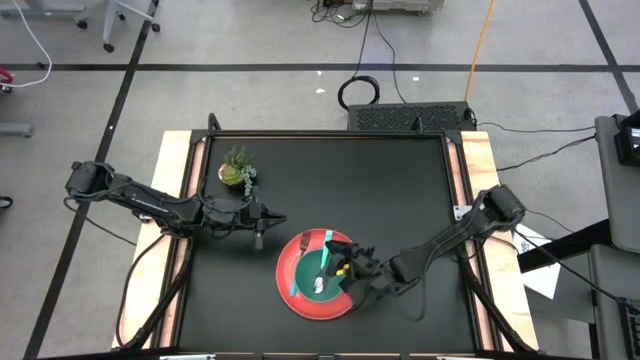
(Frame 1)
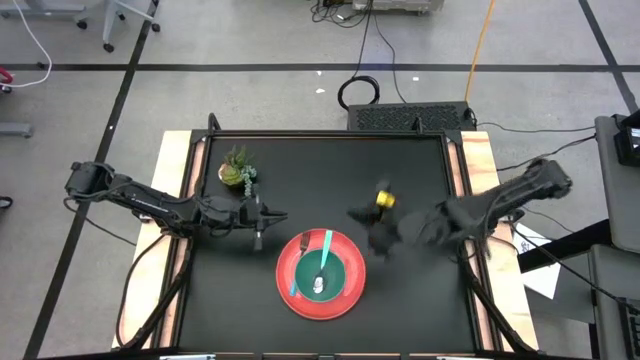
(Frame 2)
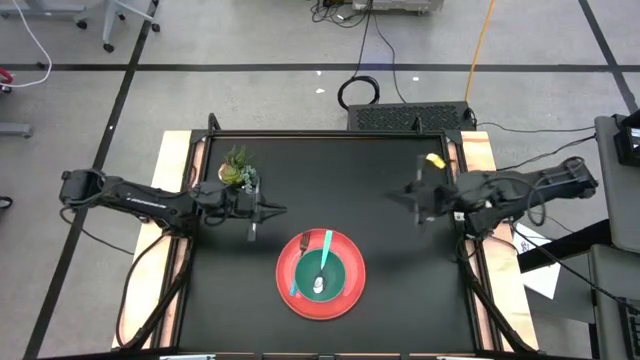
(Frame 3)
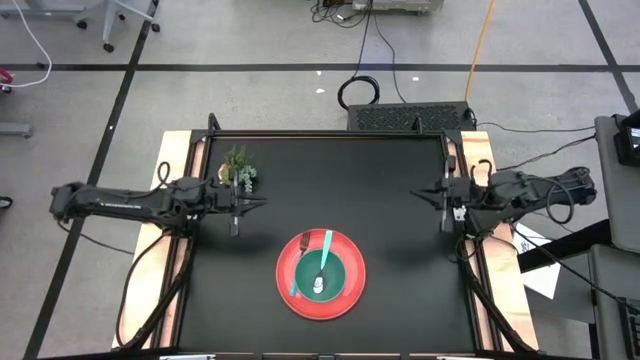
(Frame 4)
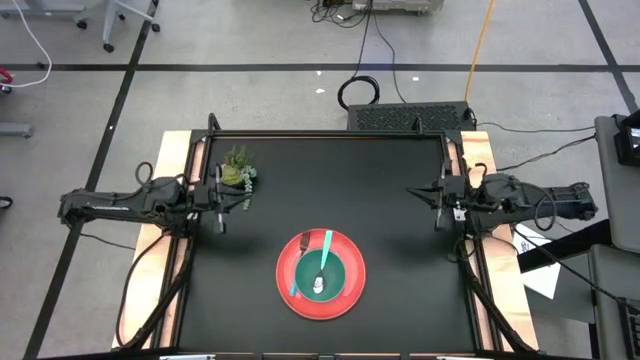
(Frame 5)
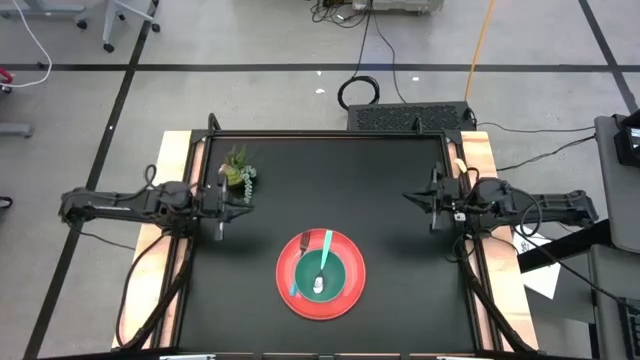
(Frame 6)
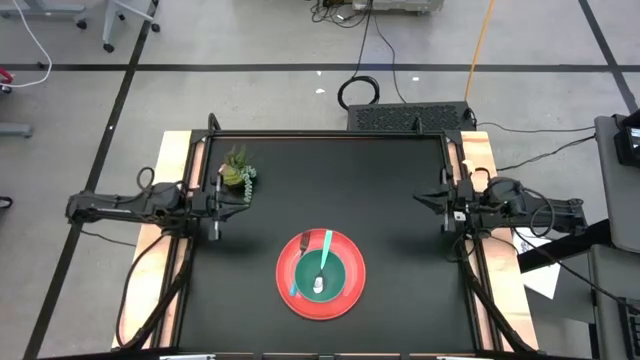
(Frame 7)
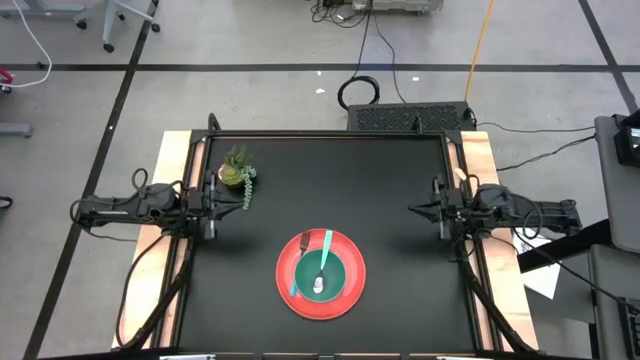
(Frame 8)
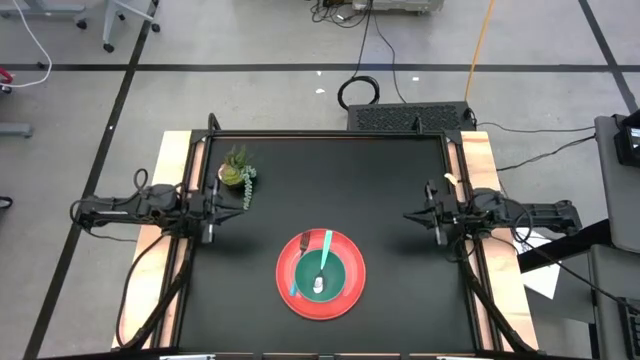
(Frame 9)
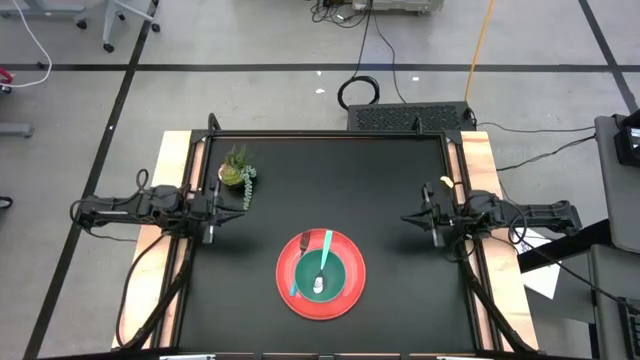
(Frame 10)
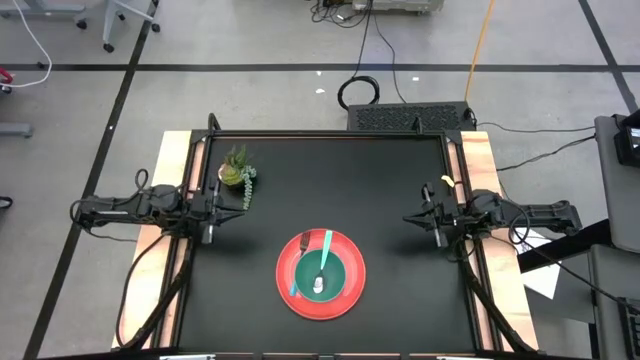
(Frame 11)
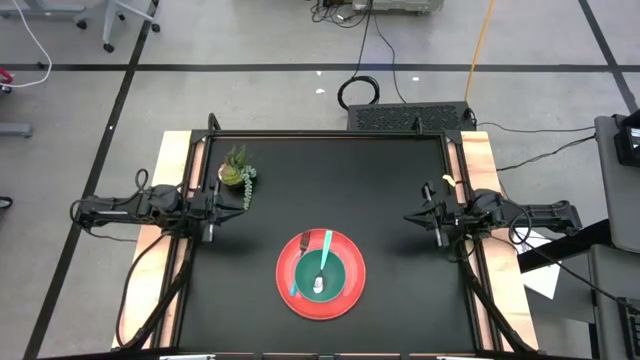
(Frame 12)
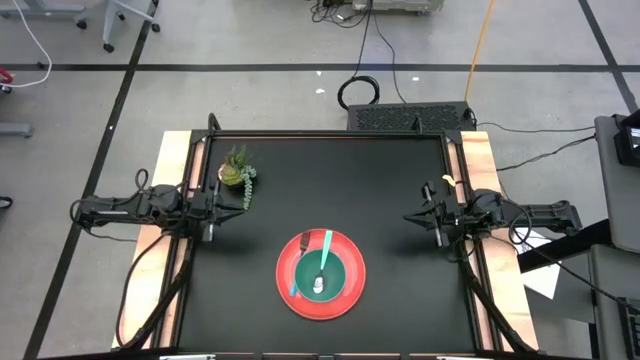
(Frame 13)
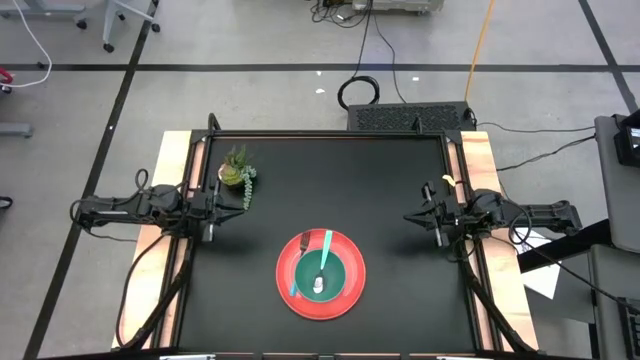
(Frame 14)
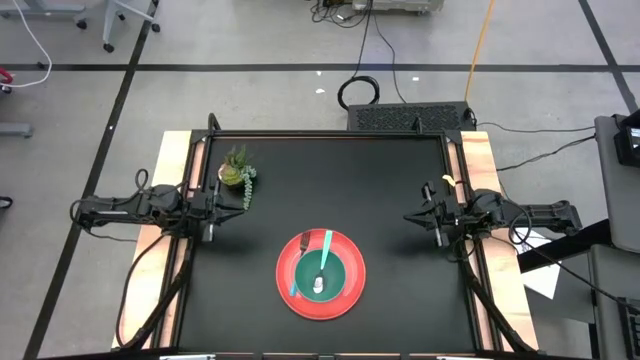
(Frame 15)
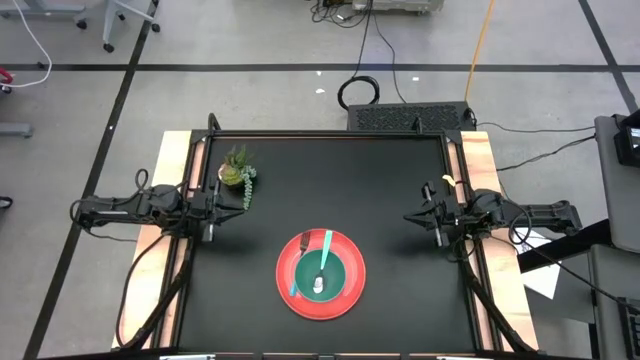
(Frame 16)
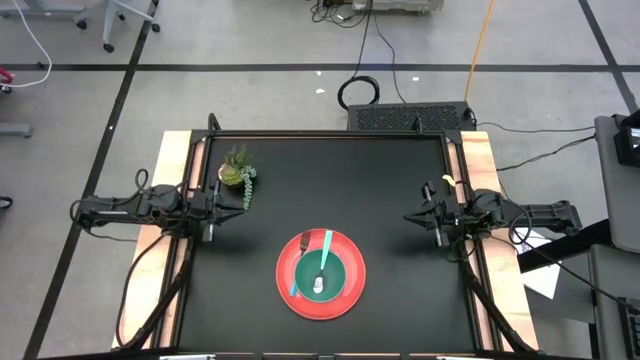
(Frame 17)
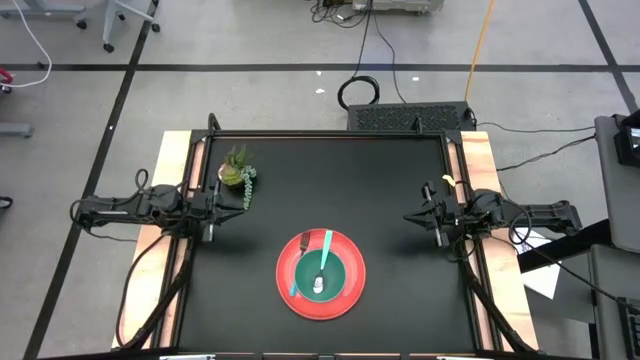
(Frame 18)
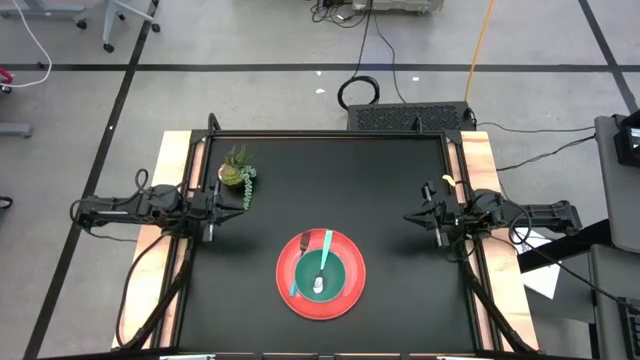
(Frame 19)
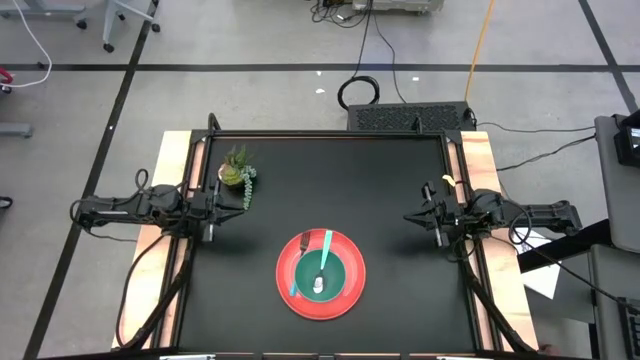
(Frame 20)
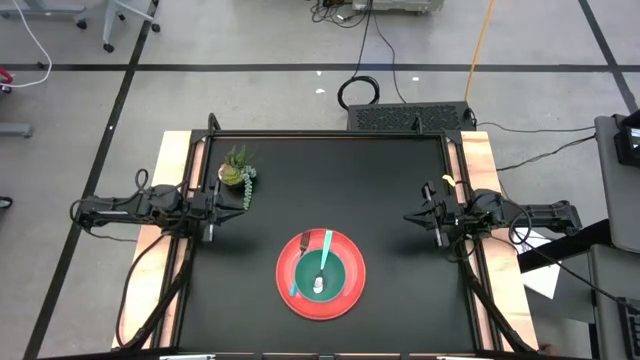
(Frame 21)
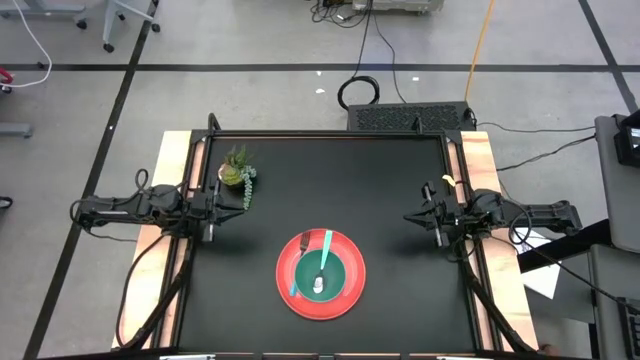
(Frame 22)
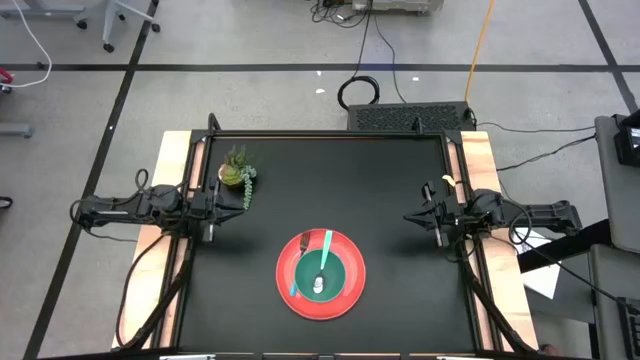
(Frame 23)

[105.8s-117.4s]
Task: Set table place
Return to Home Position

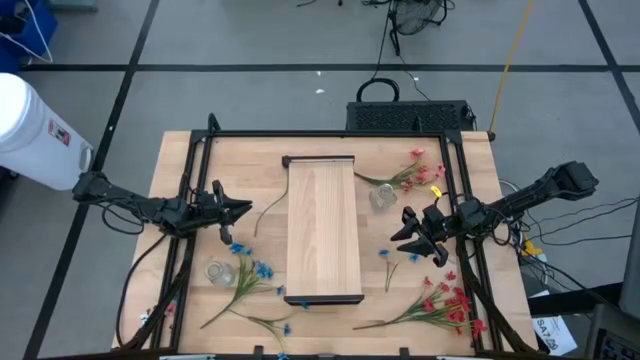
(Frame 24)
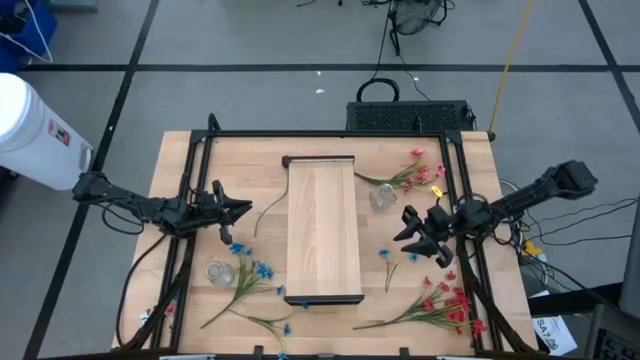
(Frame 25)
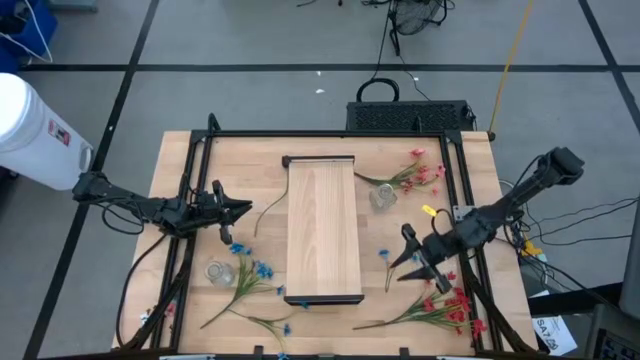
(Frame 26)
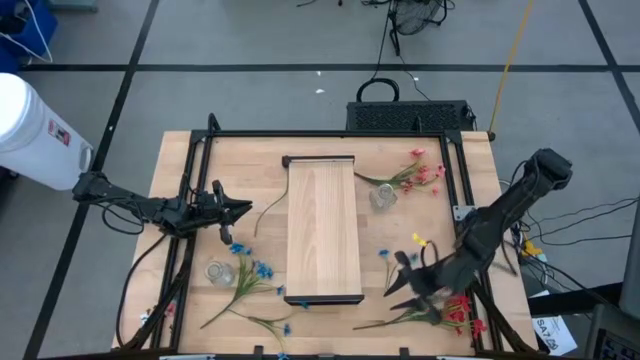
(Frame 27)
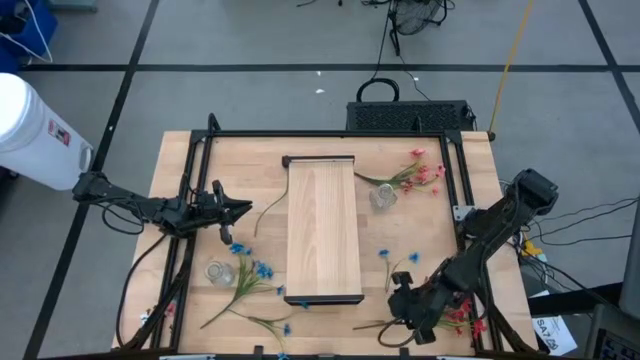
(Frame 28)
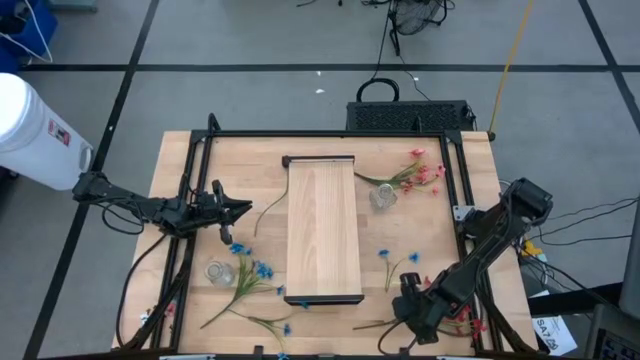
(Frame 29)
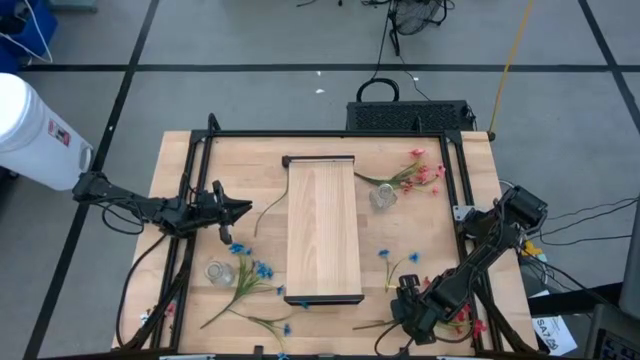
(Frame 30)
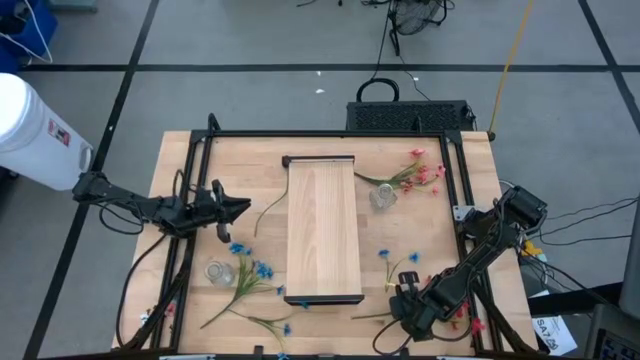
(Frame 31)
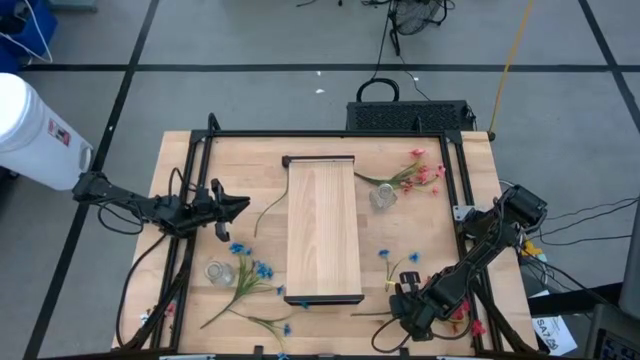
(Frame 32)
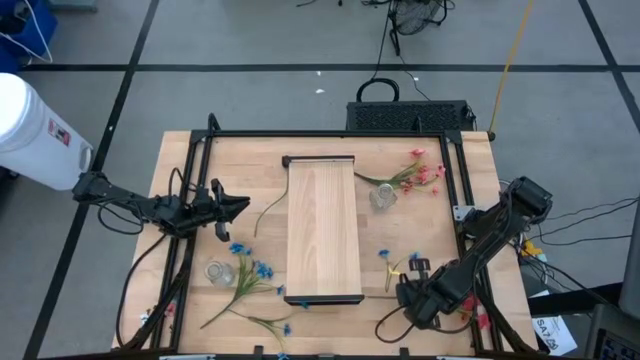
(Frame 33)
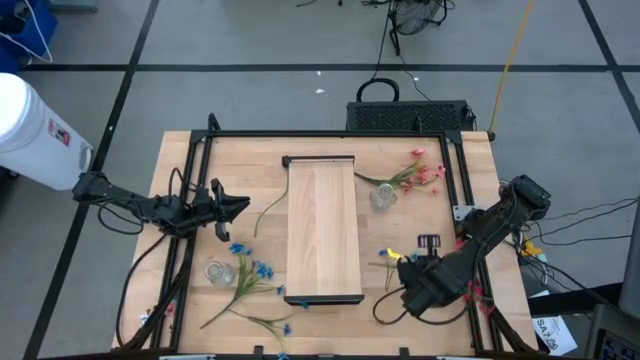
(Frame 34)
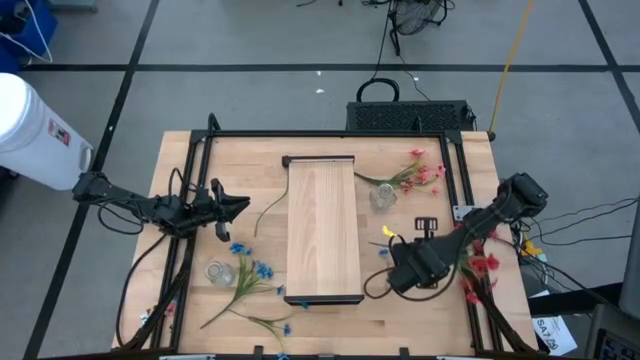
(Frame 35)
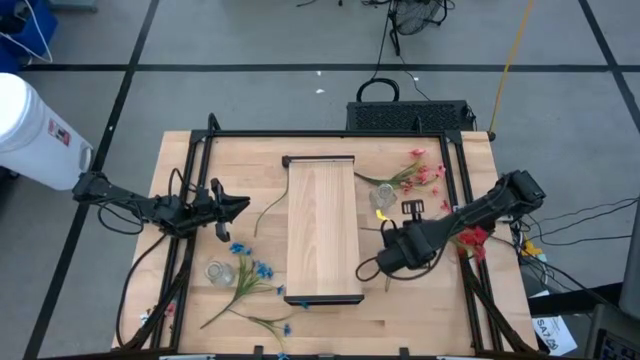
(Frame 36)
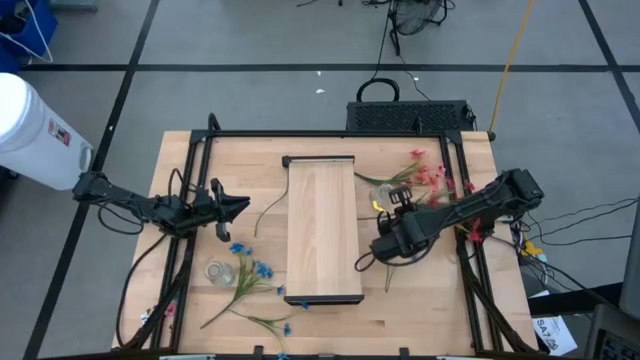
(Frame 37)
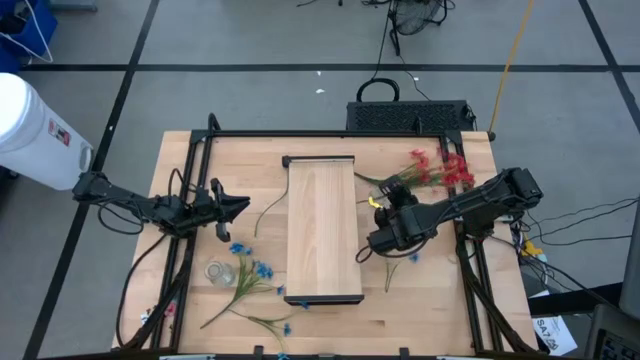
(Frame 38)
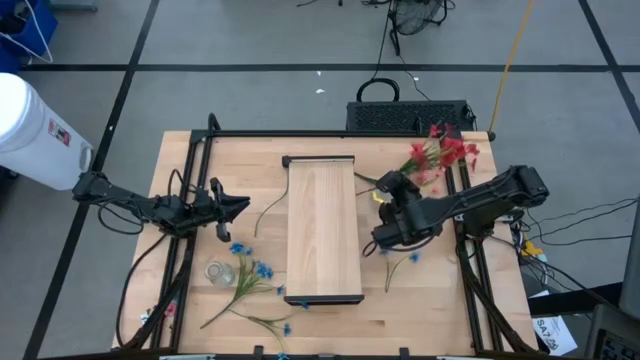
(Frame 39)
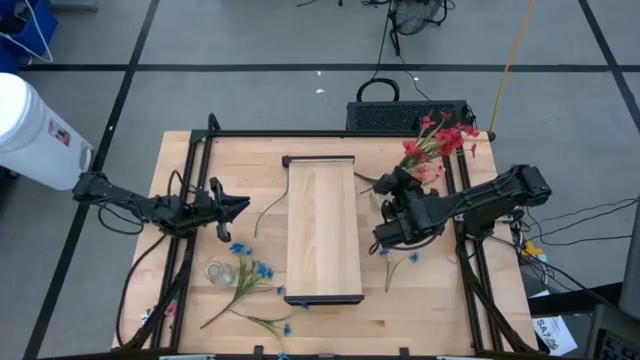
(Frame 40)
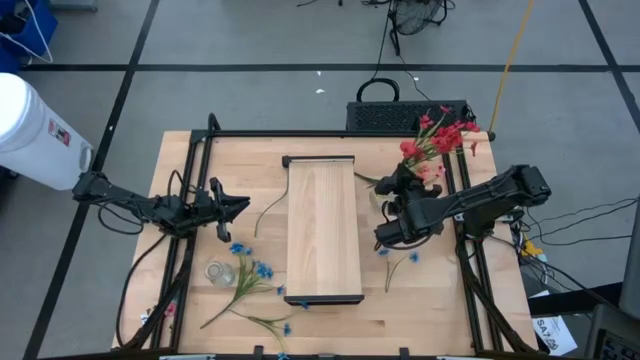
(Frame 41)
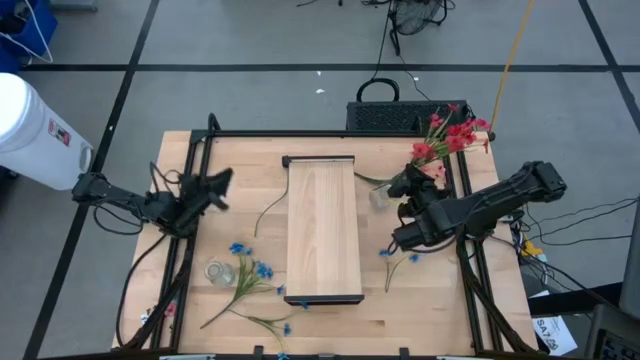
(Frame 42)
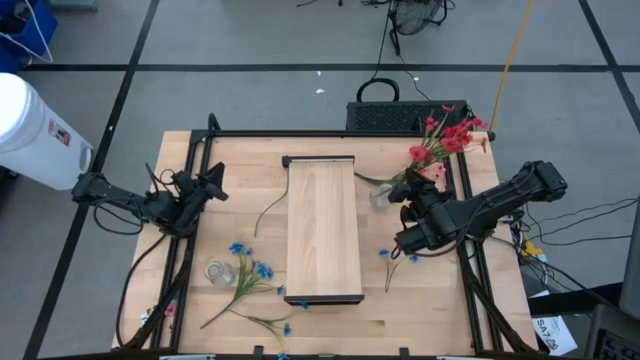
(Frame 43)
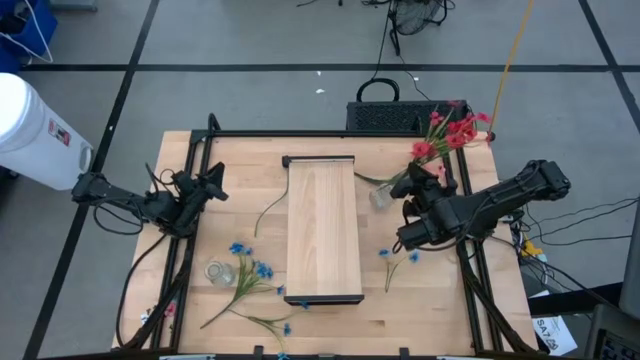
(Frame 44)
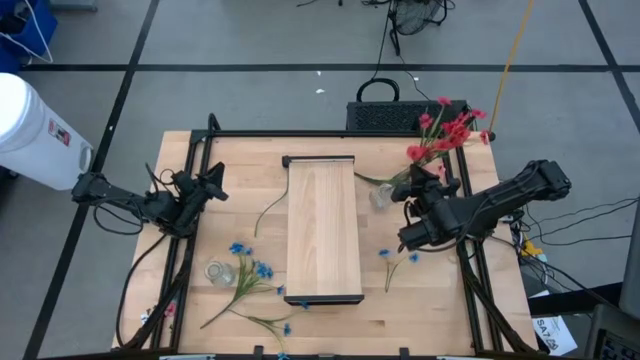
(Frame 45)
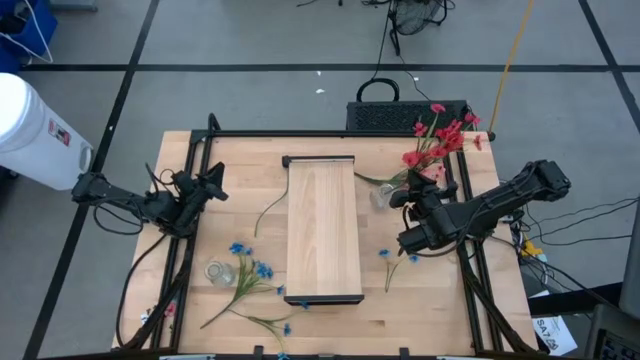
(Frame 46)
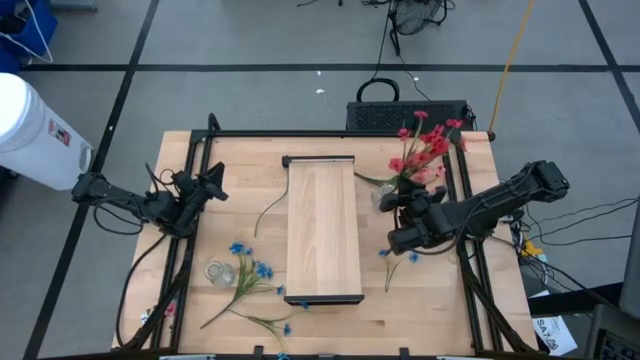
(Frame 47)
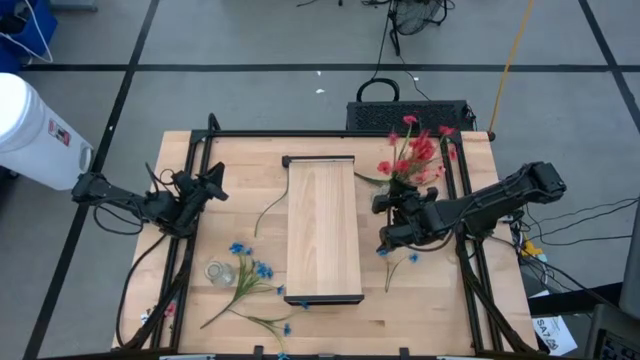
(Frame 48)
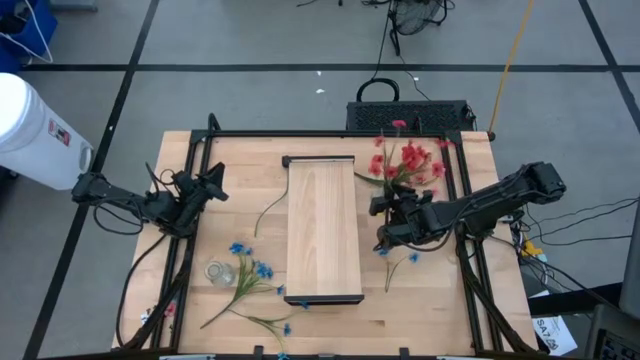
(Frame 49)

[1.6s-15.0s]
Task: Pick and place flowers into a vace then onto a shelf
Put the red flowers into the right transparent vase
